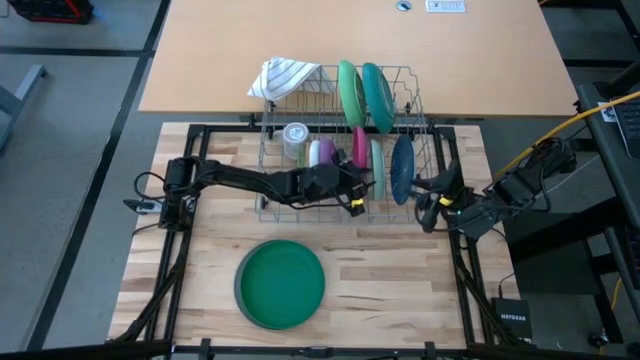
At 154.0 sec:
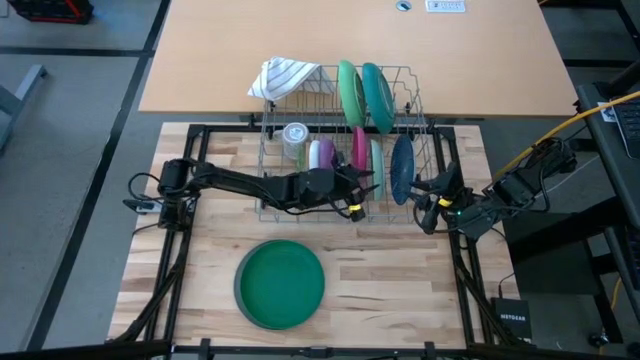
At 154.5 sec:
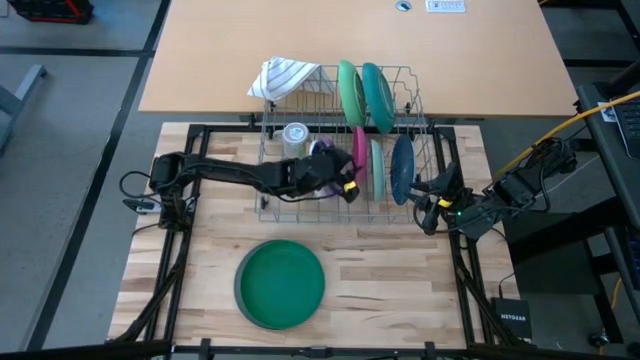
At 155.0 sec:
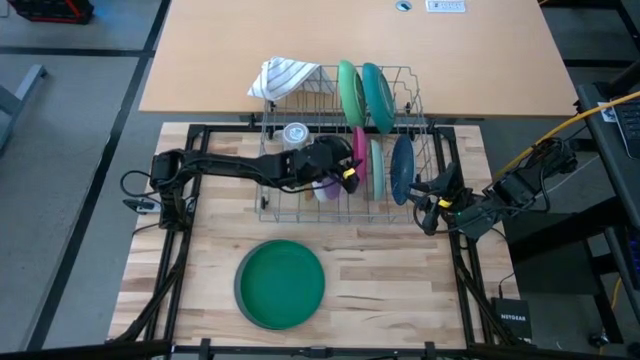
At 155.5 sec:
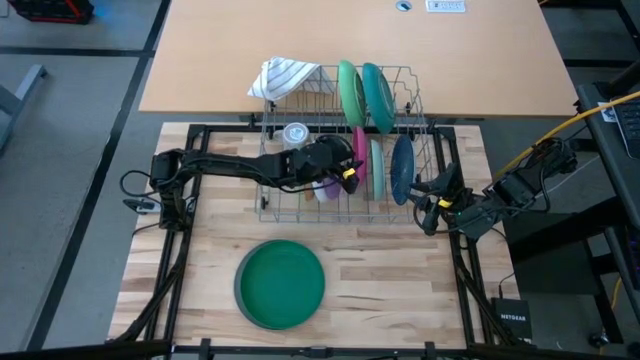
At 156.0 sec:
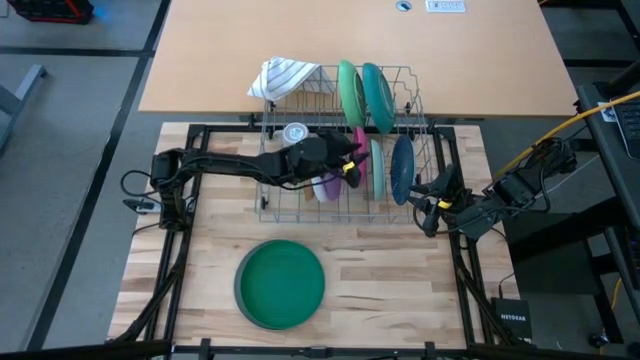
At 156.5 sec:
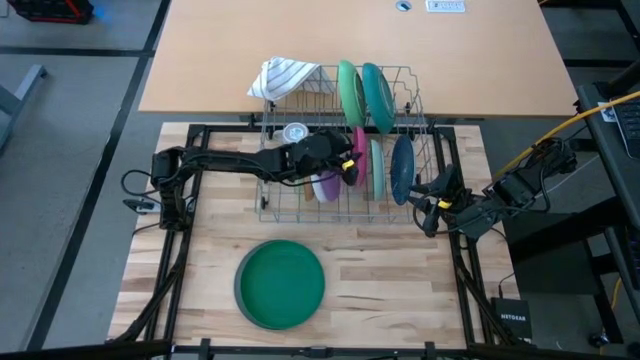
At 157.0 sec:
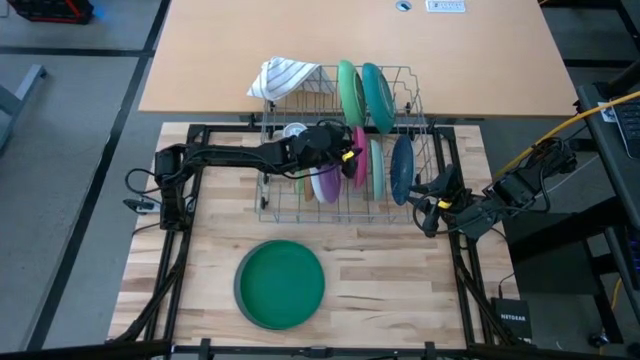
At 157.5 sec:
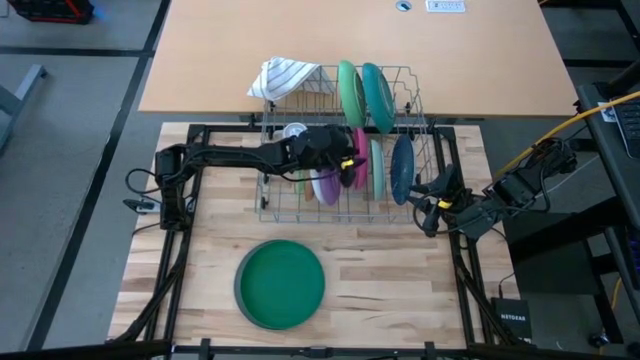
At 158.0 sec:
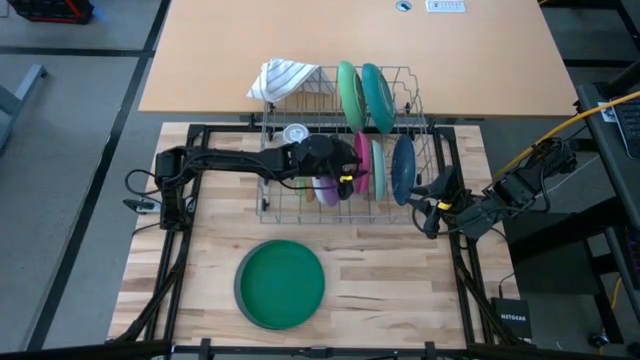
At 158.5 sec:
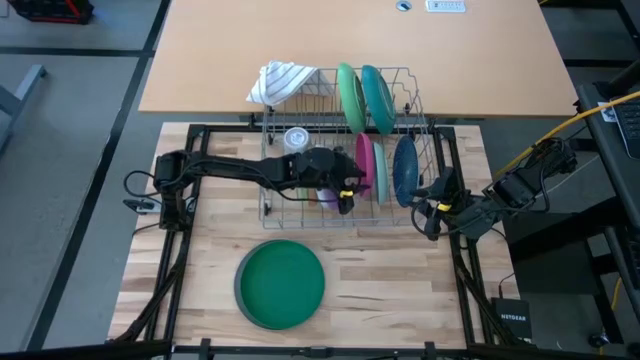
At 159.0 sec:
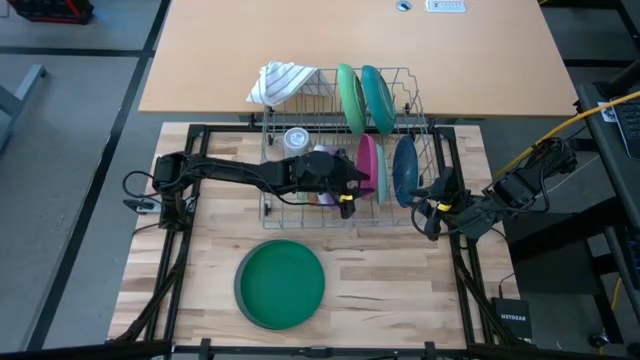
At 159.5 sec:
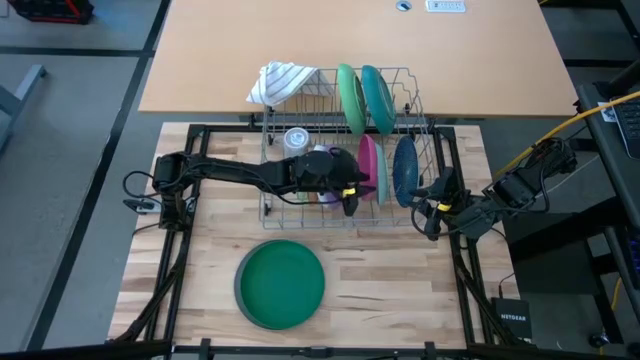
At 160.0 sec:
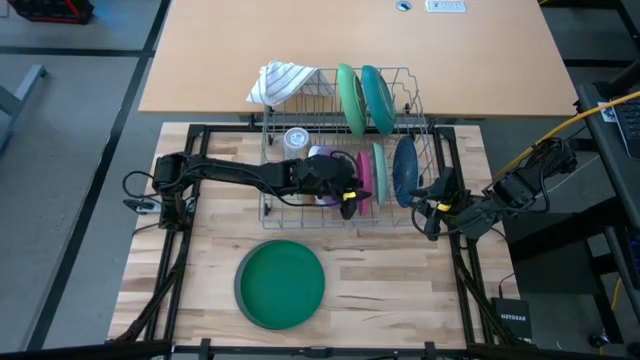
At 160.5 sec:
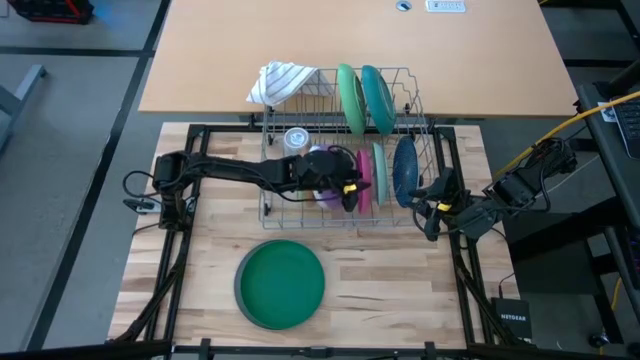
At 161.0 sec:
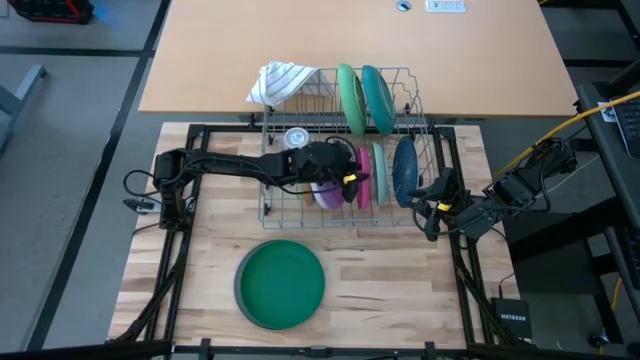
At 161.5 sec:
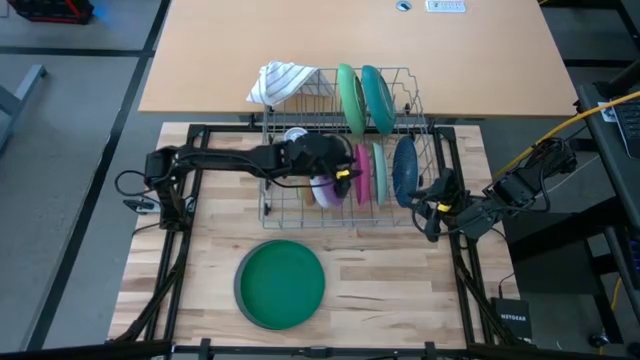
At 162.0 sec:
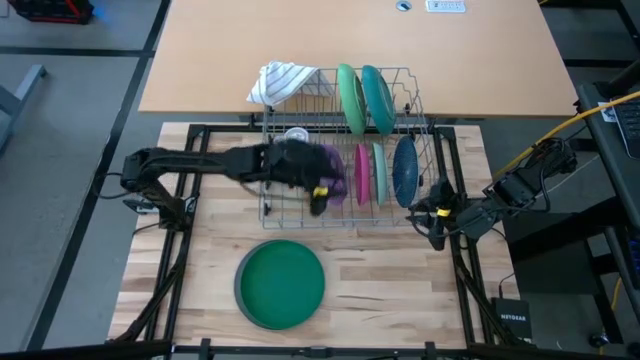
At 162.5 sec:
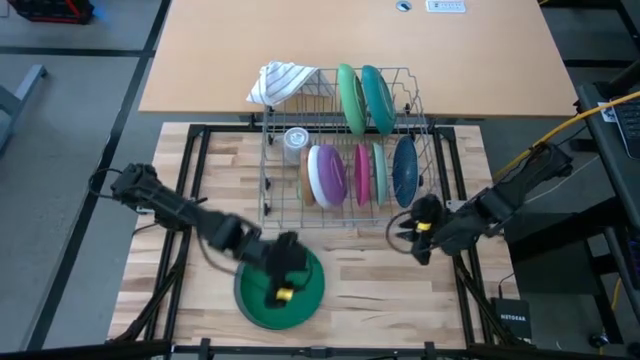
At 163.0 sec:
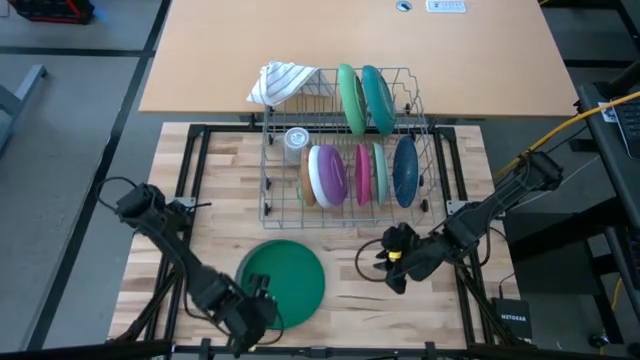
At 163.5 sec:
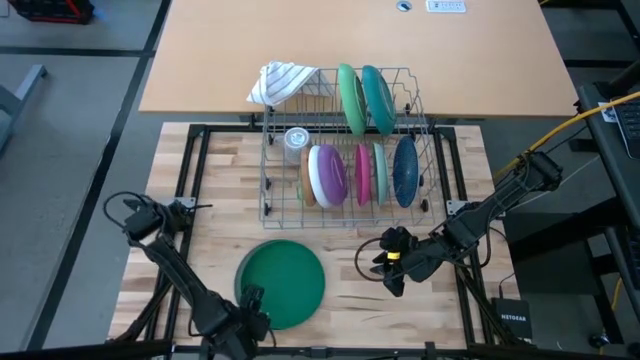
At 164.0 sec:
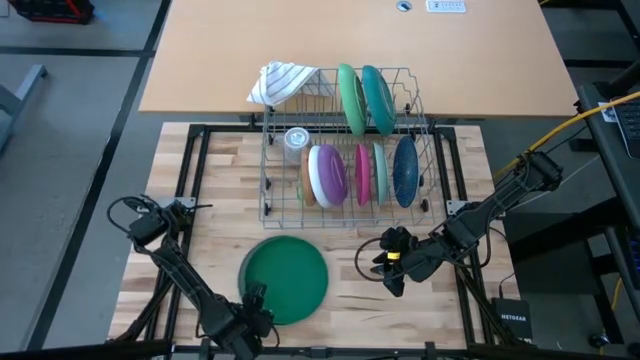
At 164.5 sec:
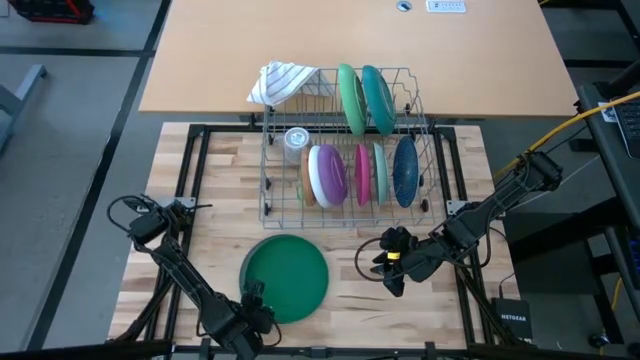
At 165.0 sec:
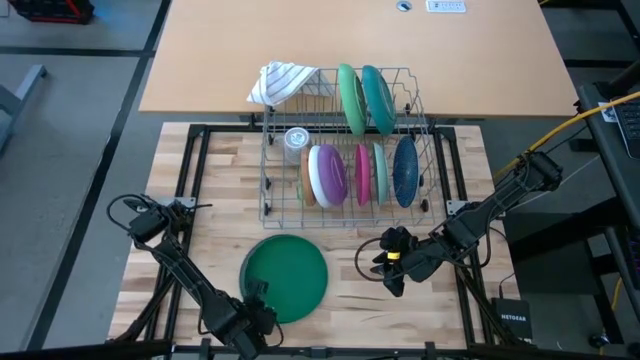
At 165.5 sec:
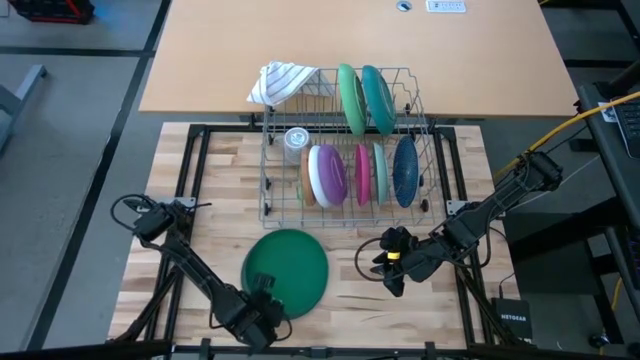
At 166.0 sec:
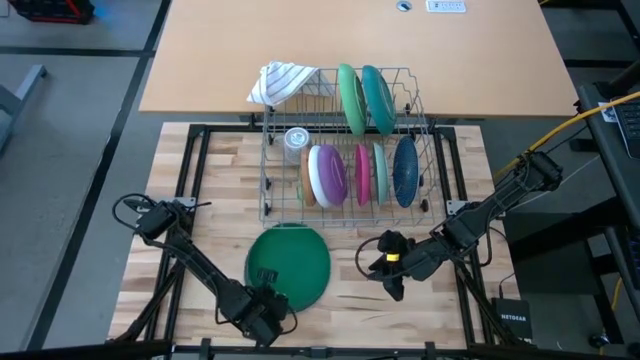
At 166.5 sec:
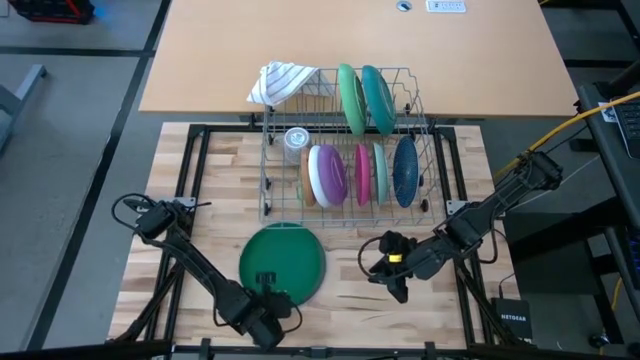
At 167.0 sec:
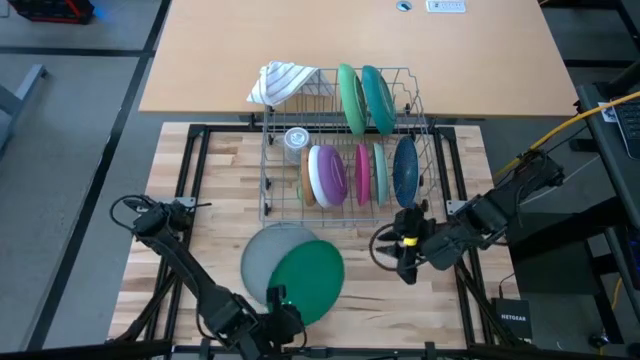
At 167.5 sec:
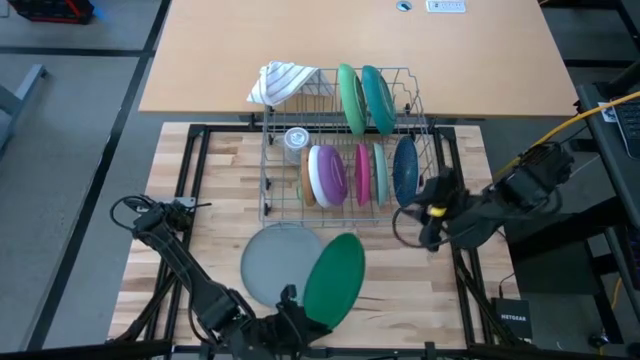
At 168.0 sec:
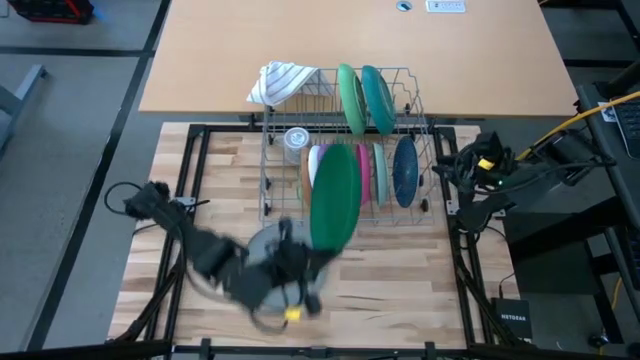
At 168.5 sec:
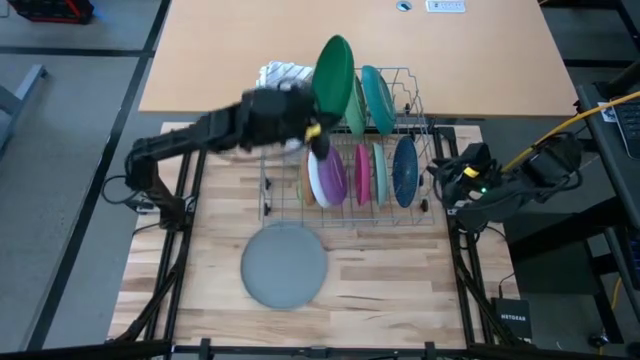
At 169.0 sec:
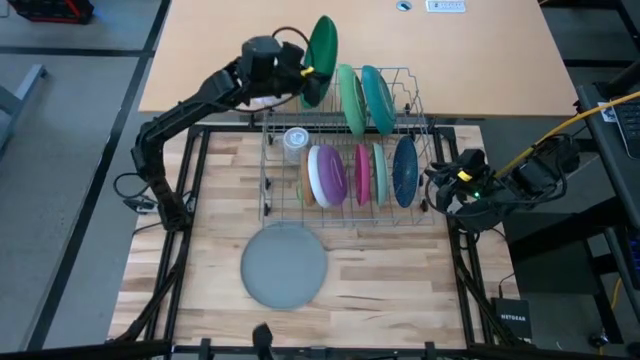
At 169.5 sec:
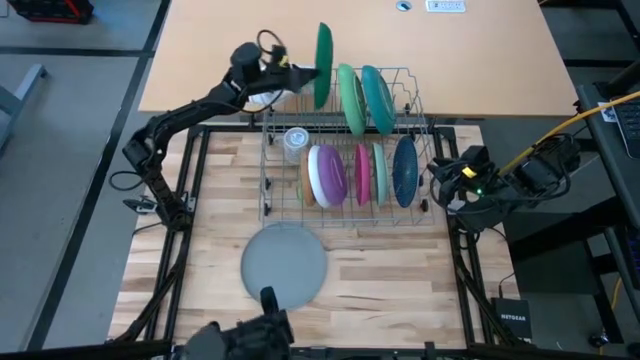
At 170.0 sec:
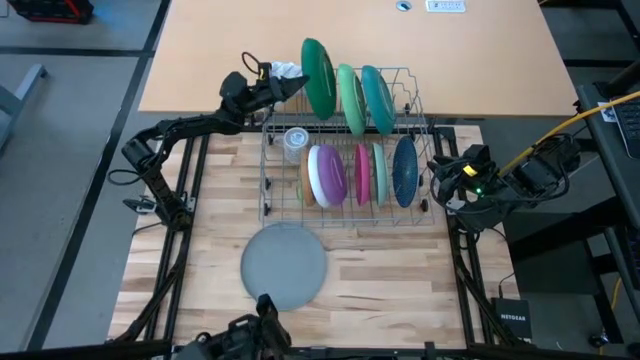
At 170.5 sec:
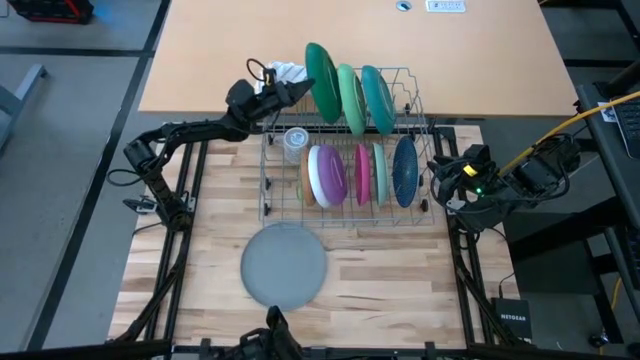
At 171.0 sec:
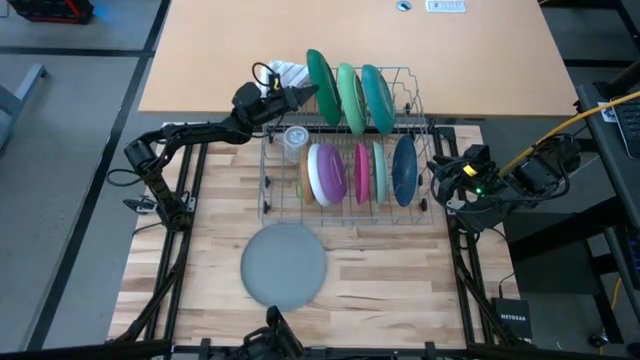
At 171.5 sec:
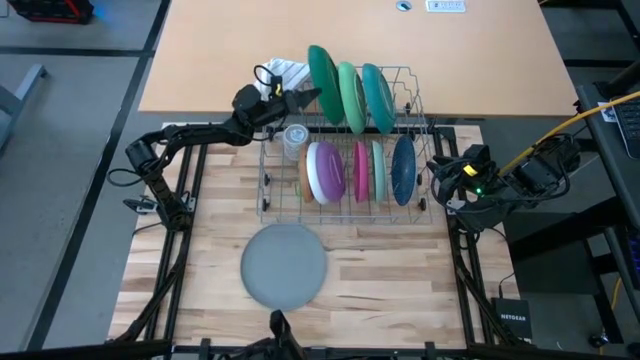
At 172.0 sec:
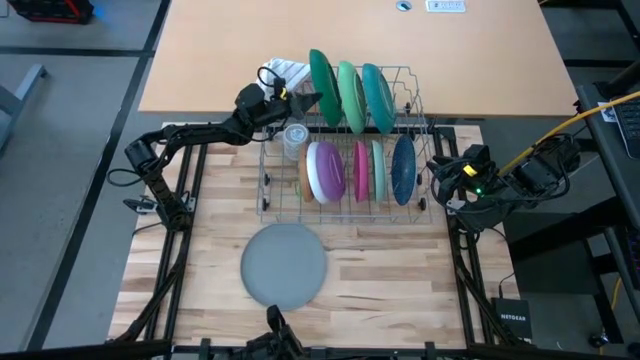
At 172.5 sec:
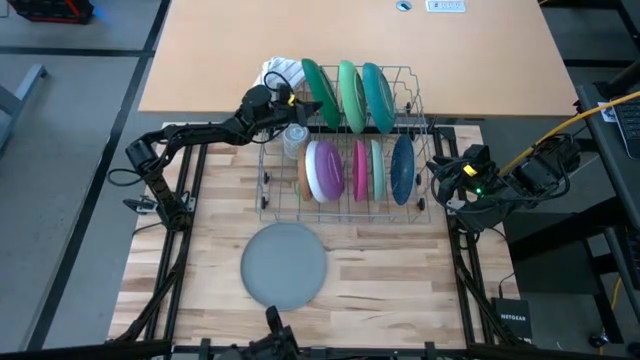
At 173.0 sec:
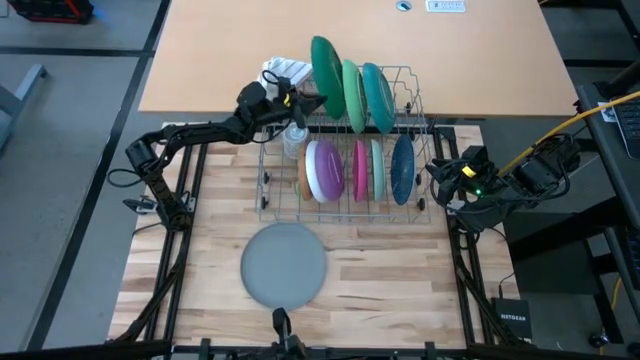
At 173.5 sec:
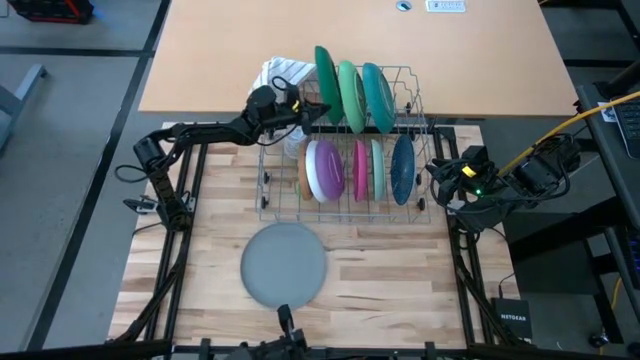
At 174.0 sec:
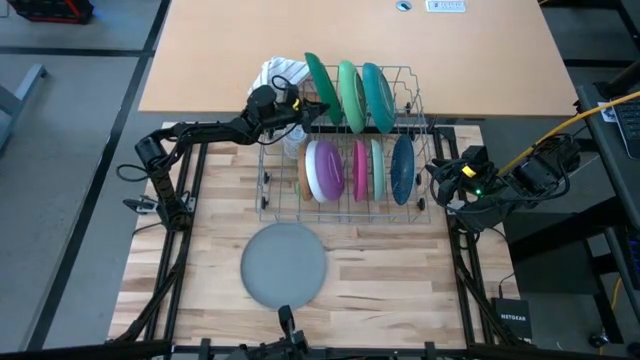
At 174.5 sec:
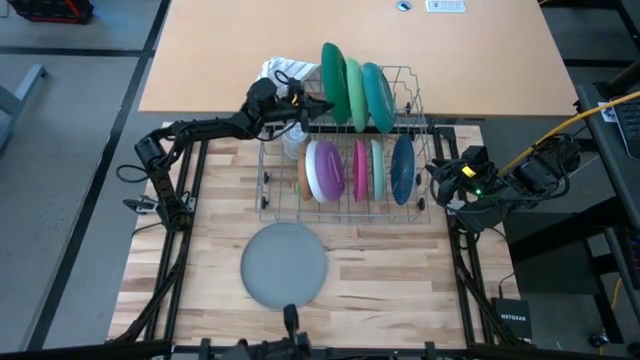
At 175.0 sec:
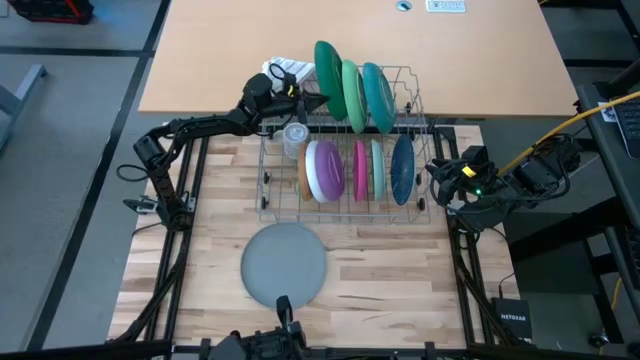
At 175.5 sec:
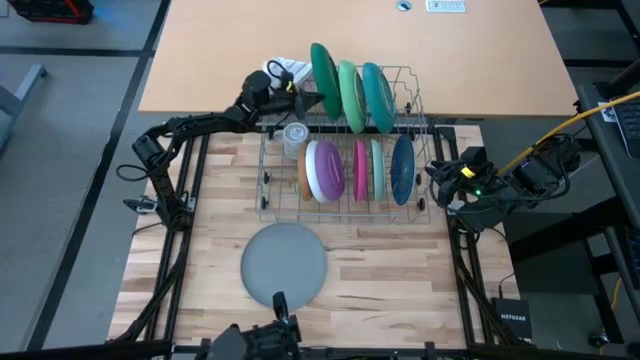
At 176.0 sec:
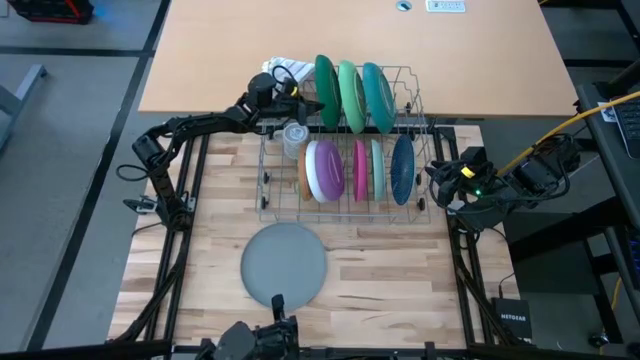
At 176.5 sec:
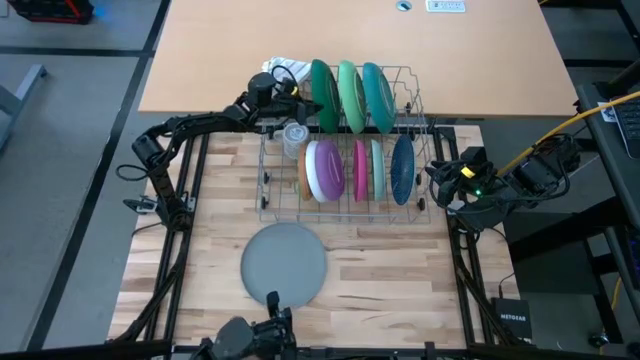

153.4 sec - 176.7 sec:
Task: Sort dishes
Put the green plate in the dishwasher rack
